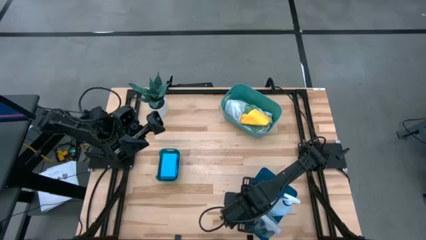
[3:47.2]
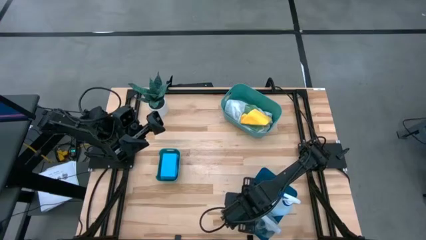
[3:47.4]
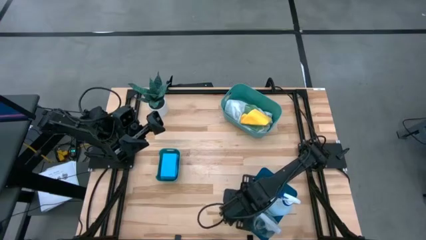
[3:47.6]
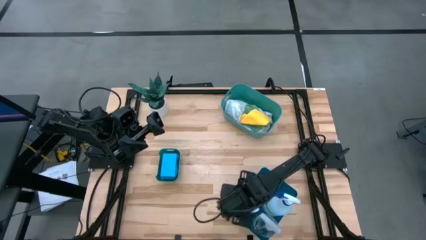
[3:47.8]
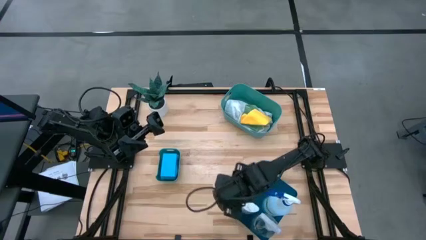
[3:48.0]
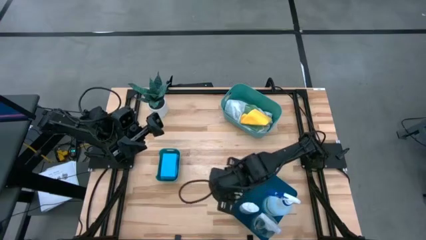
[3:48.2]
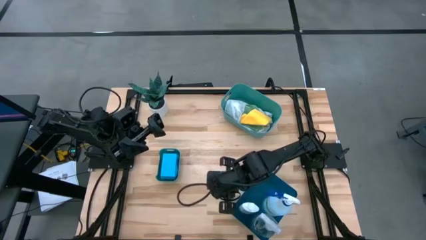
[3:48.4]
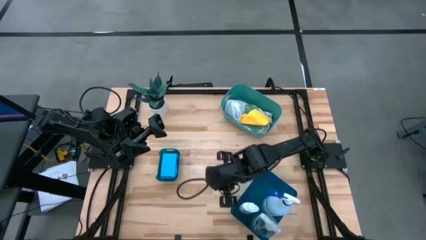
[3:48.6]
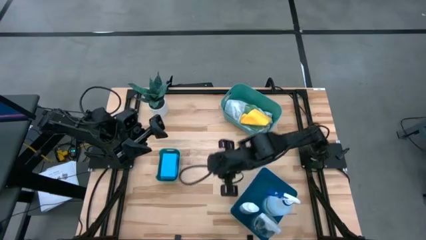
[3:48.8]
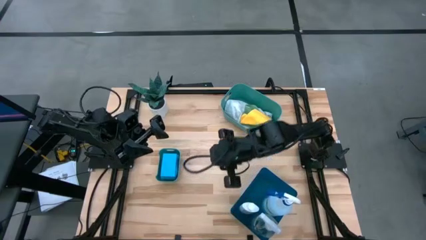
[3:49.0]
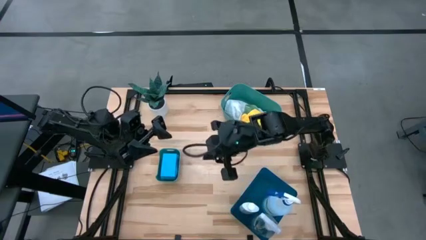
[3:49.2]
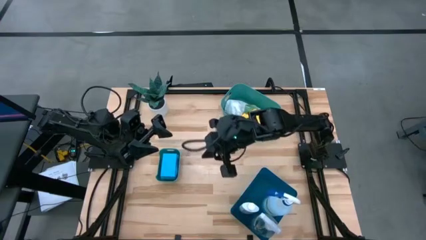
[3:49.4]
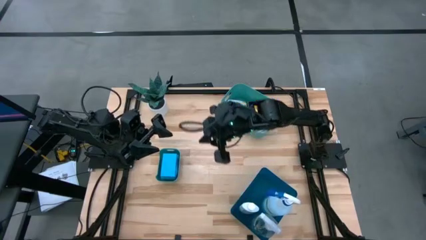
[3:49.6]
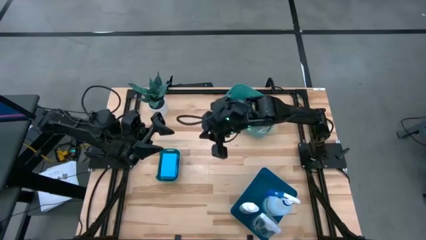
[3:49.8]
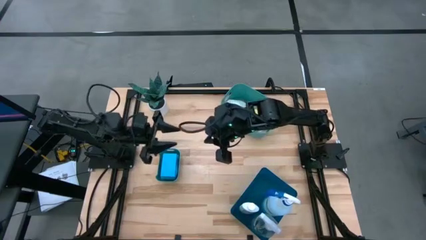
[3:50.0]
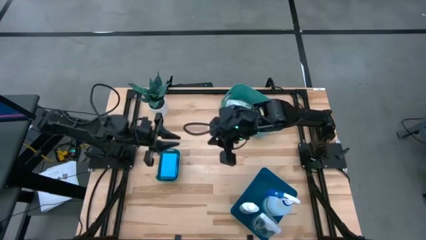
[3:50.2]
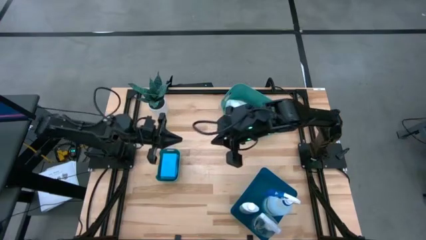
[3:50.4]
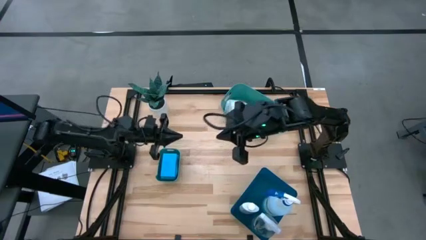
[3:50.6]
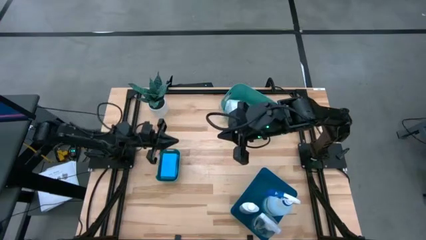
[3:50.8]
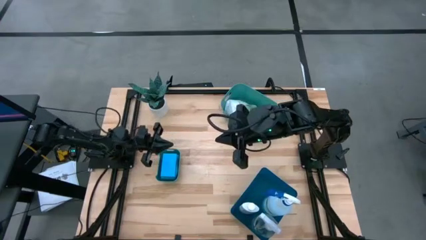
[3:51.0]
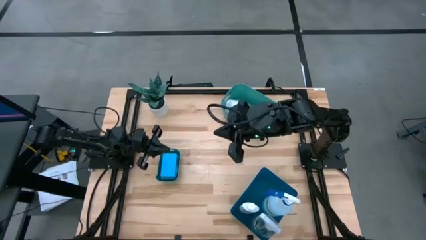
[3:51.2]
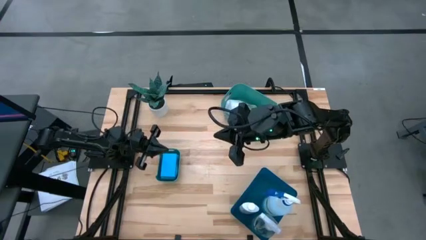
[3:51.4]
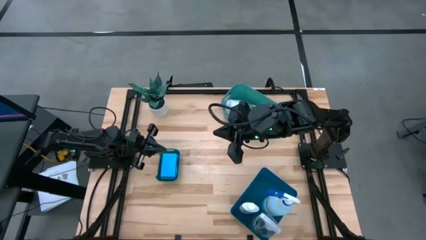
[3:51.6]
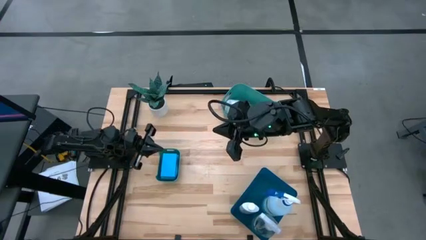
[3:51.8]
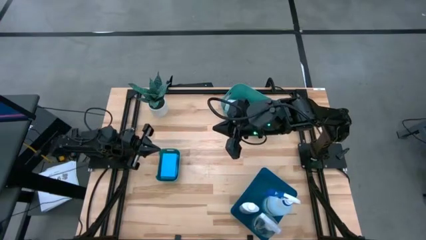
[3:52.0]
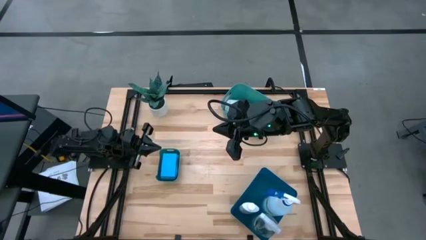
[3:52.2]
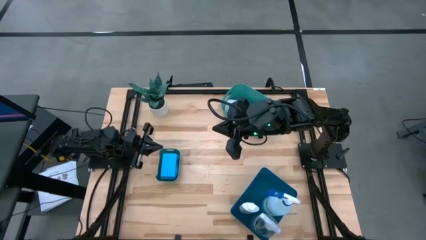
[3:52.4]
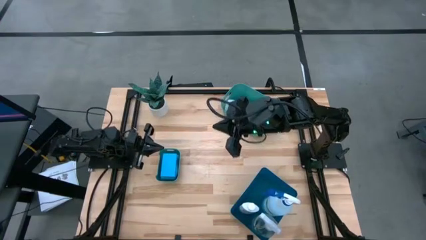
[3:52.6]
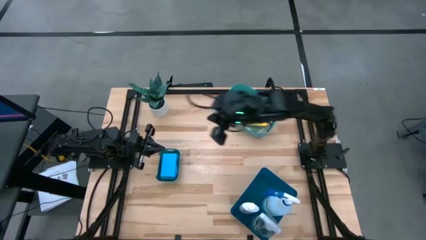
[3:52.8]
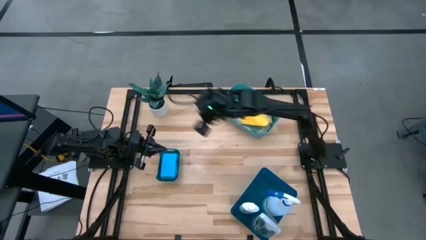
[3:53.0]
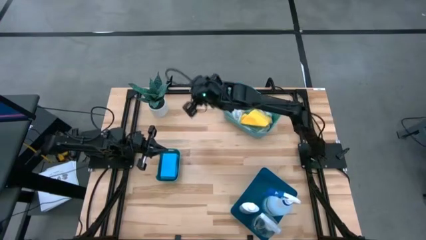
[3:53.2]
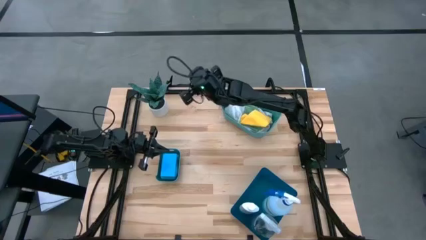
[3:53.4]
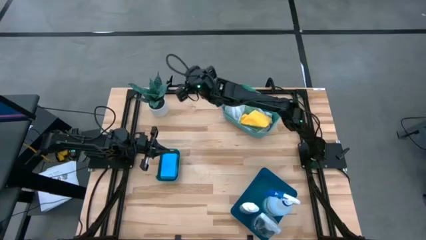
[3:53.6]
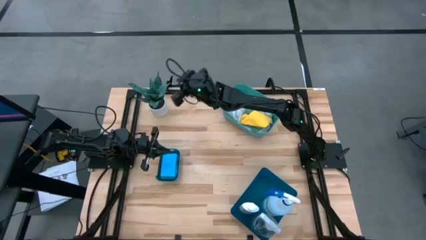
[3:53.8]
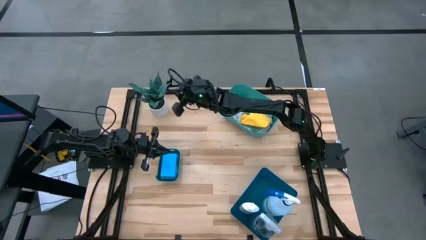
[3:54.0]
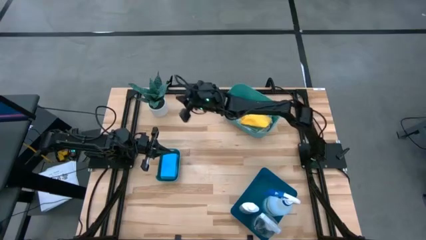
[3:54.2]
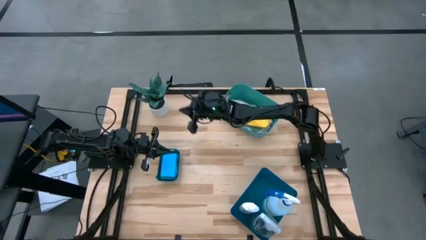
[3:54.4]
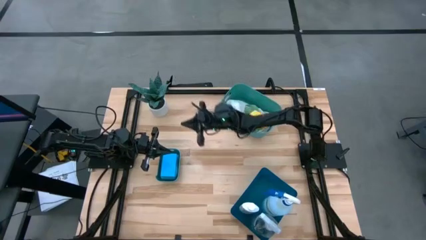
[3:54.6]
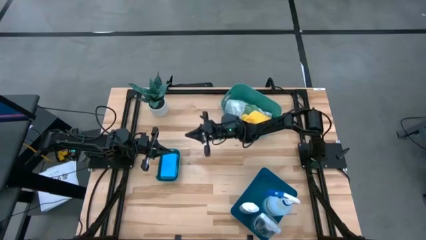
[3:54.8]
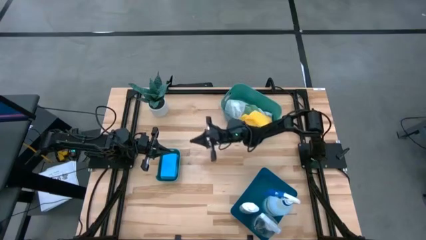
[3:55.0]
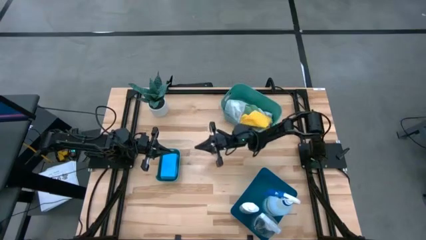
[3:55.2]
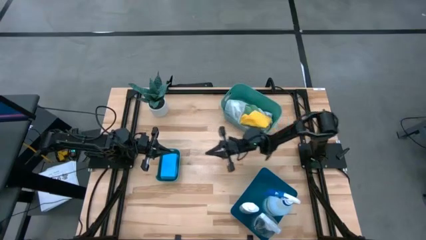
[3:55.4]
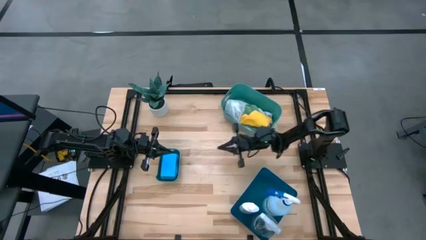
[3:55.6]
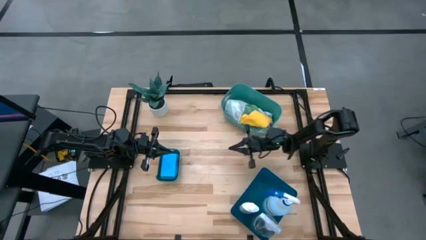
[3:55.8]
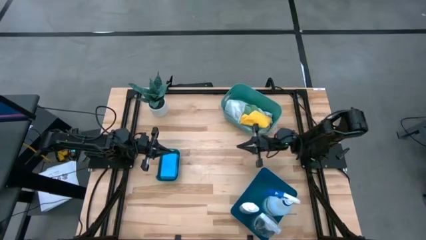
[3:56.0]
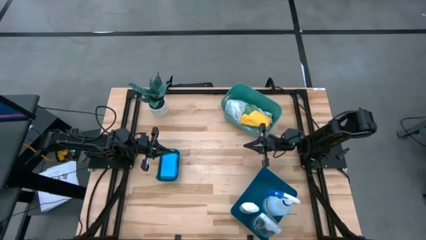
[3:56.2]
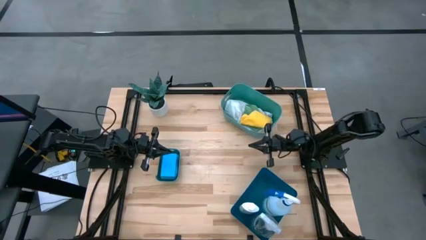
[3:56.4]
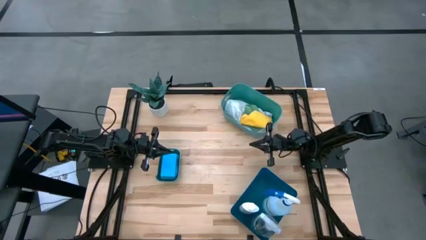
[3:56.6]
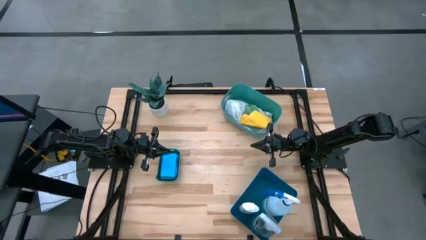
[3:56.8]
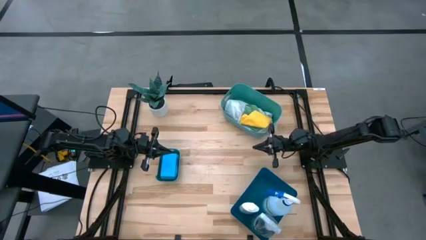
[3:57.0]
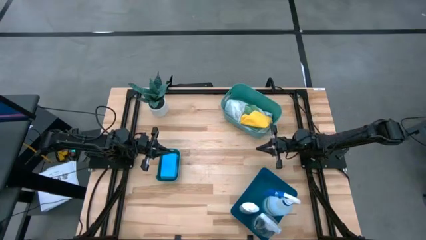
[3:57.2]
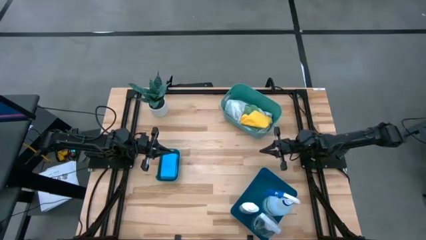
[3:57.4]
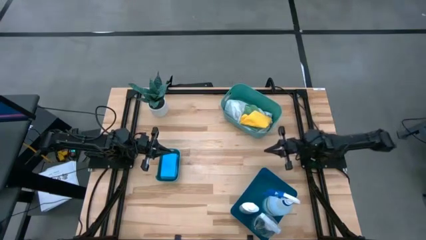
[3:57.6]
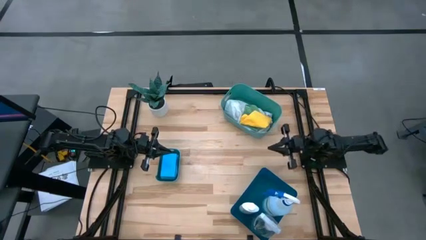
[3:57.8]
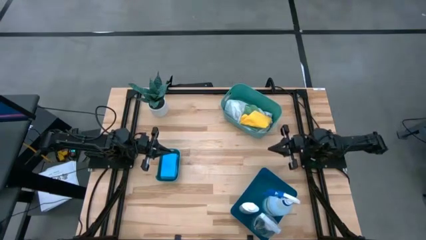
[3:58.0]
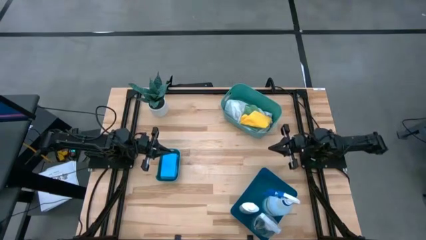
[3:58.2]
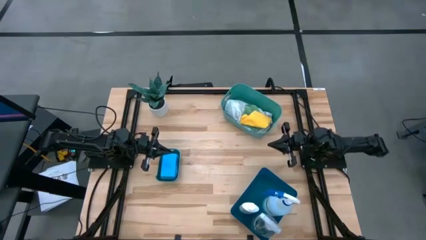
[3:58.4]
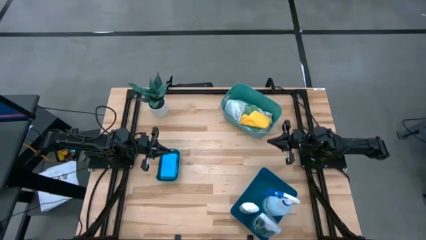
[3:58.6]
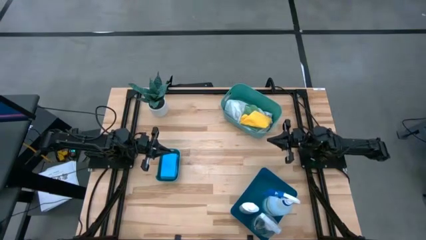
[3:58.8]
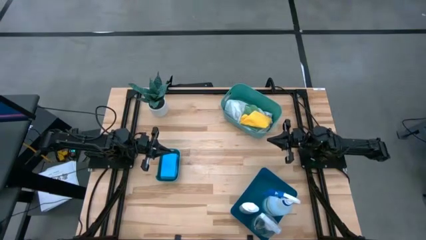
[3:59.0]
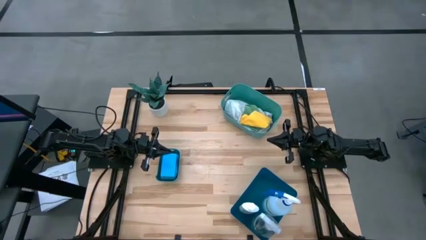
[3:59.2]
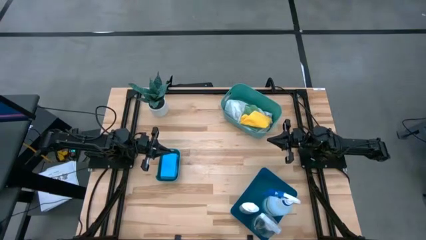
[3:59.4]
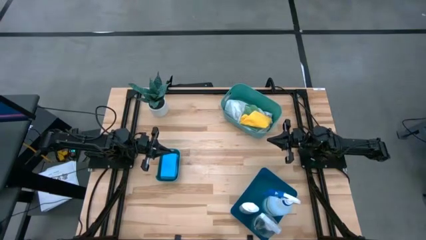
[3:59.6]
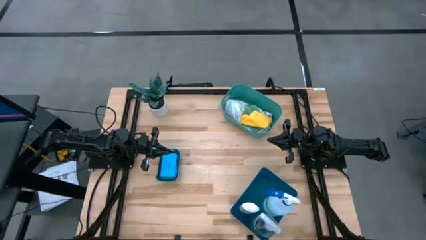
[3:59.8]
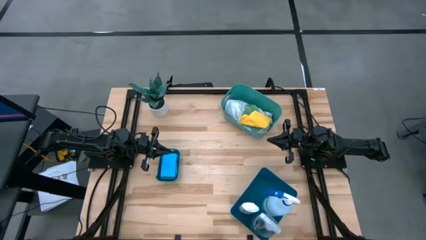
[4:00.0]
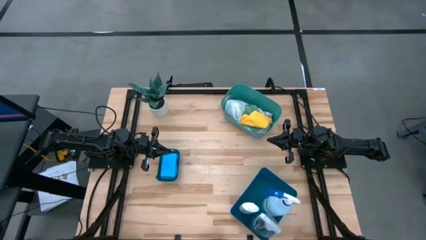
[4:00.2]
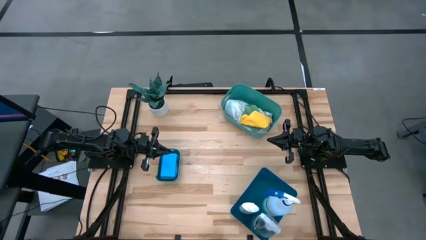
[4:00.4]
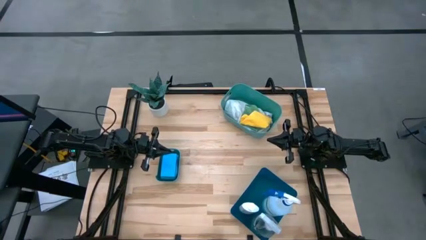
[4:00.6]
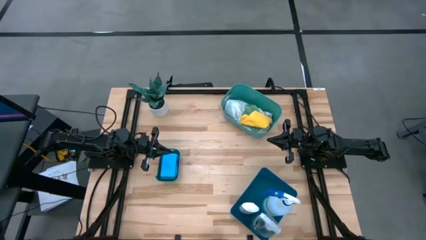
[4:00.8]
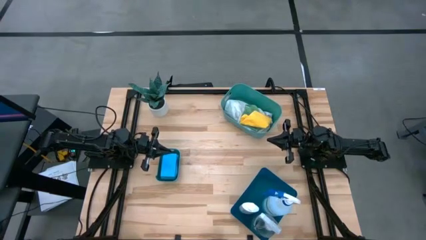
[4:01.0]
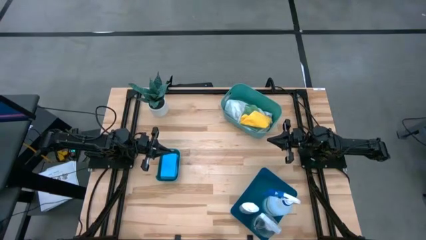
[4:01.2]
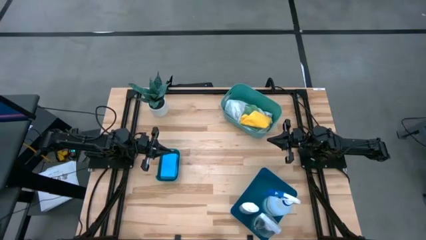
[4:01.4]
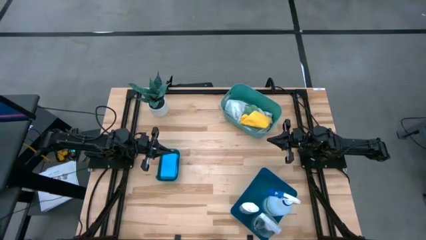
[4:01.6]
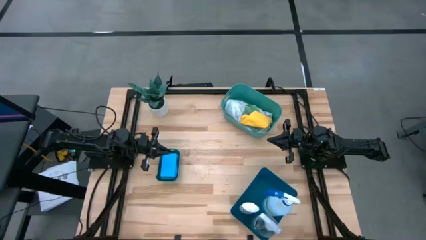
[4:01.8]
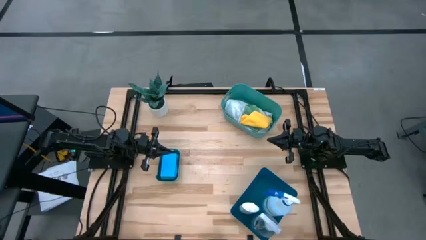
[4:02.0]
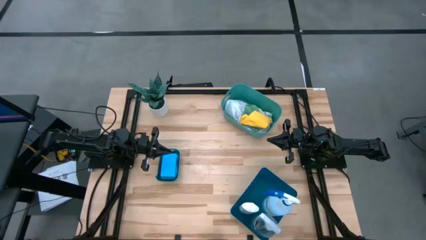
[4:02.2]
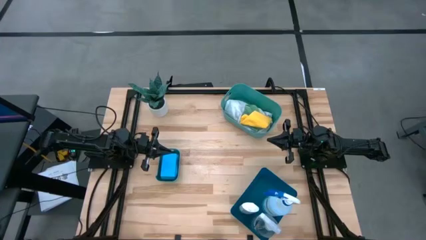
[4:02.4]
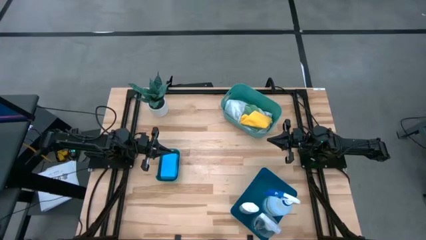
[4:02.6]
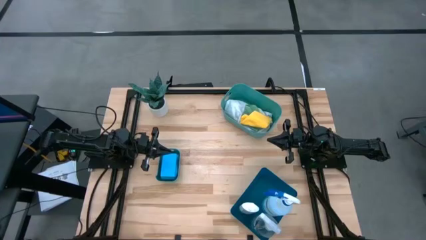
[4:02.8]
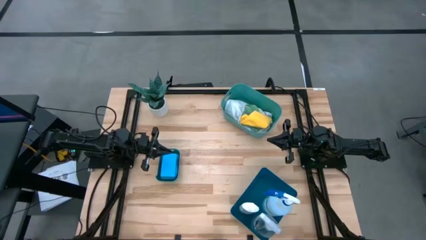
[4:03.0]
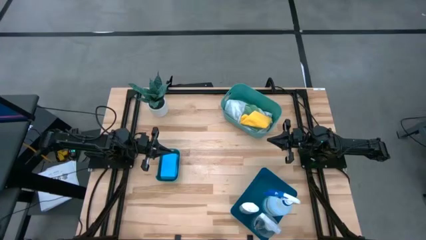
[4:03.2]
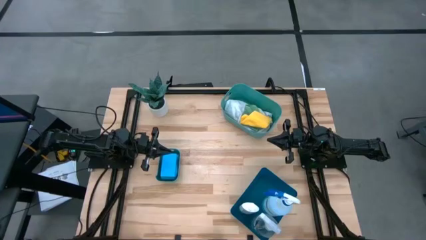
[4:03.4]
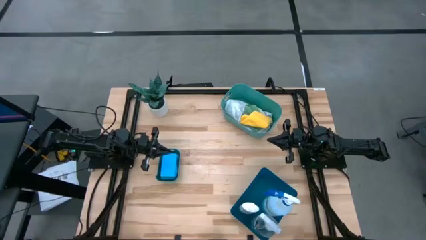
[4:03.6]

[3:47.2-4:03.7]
Task: Pick & Place Kitchen Items
Return to Home Position
